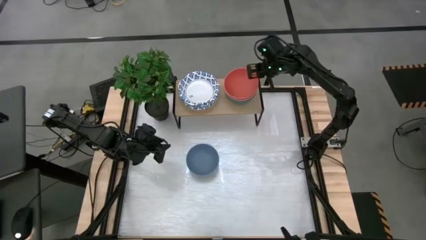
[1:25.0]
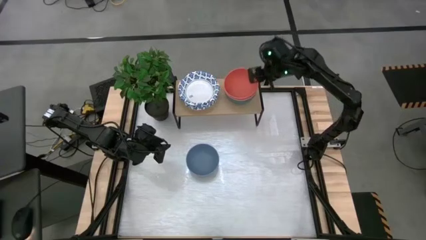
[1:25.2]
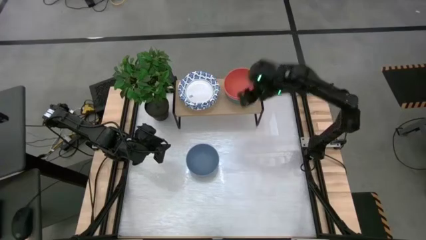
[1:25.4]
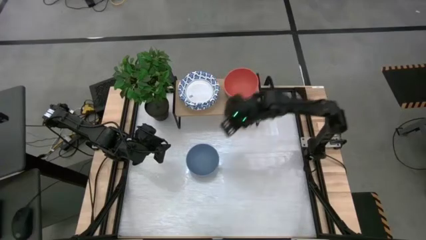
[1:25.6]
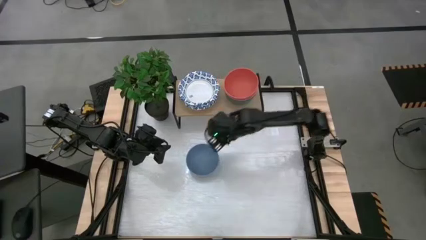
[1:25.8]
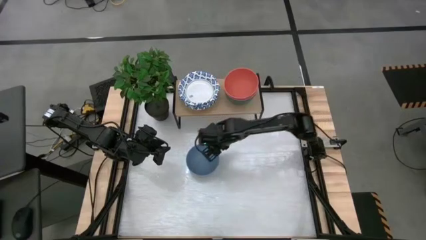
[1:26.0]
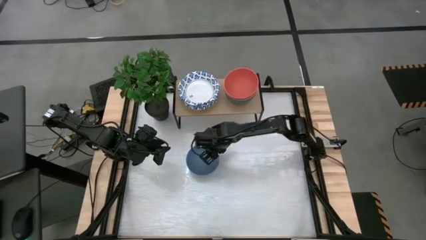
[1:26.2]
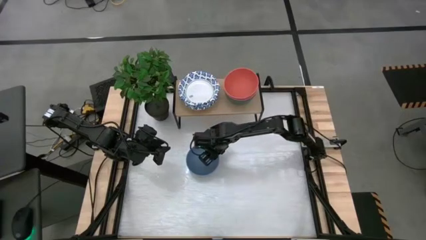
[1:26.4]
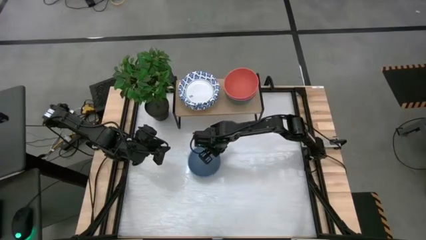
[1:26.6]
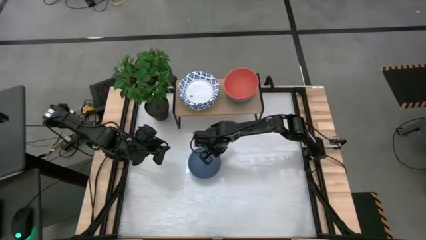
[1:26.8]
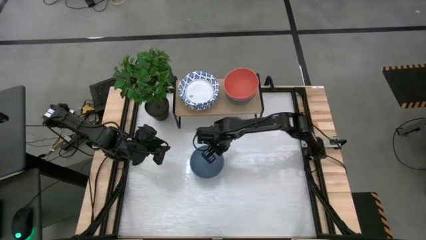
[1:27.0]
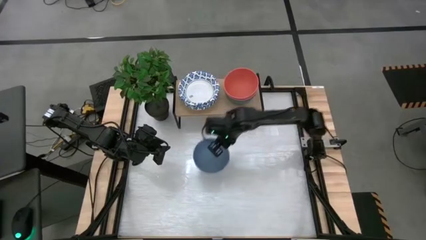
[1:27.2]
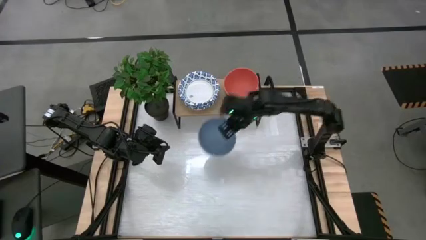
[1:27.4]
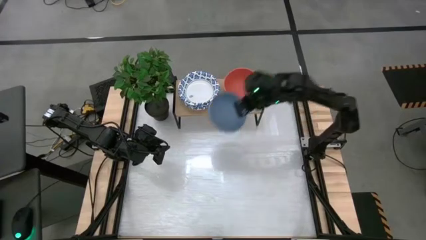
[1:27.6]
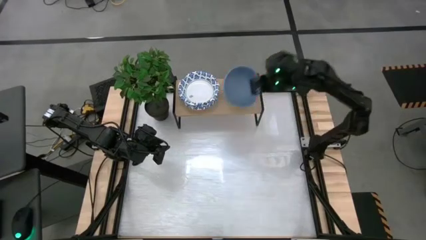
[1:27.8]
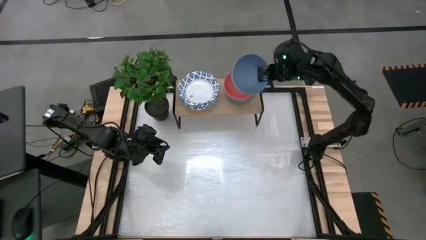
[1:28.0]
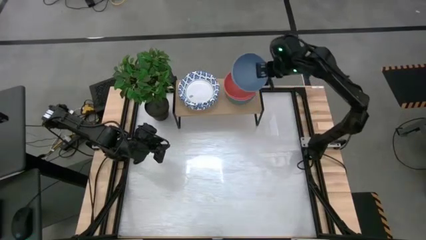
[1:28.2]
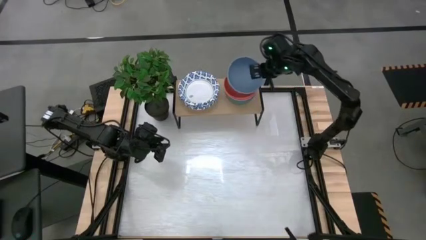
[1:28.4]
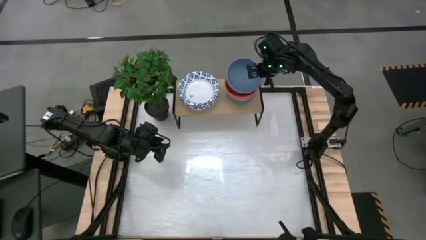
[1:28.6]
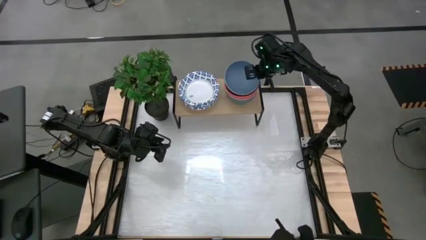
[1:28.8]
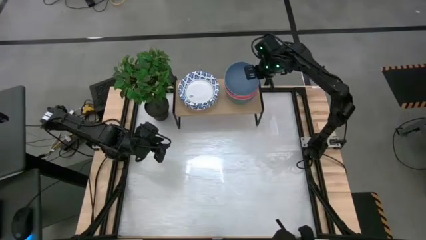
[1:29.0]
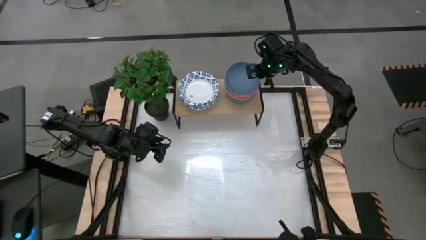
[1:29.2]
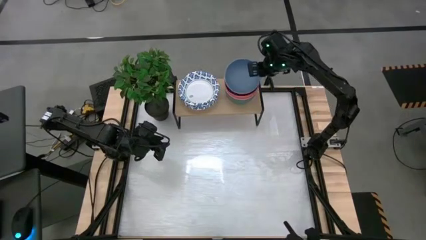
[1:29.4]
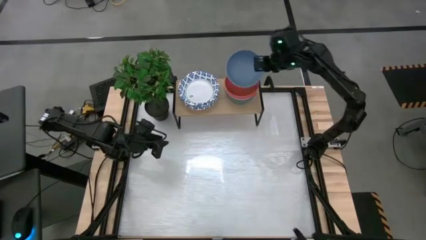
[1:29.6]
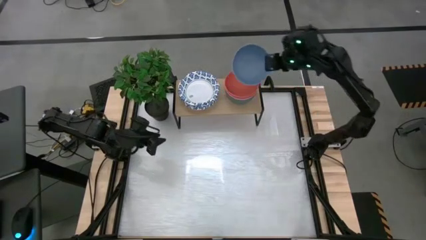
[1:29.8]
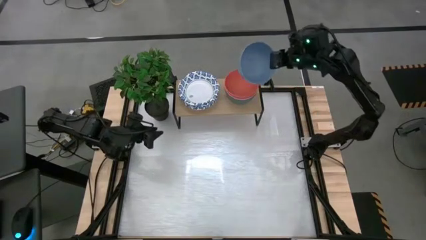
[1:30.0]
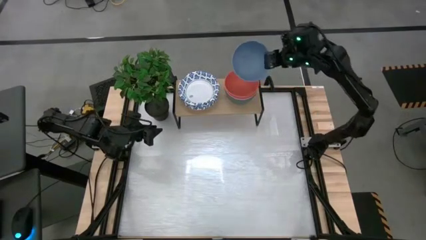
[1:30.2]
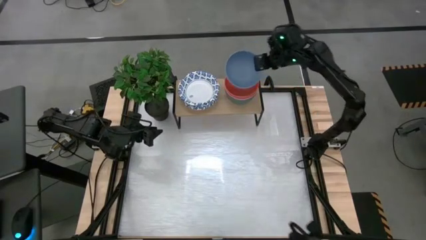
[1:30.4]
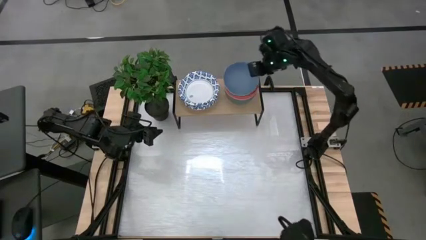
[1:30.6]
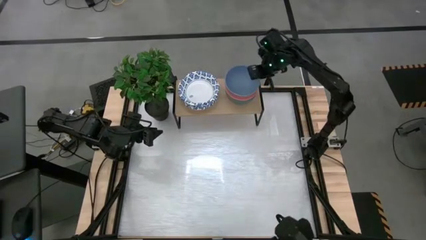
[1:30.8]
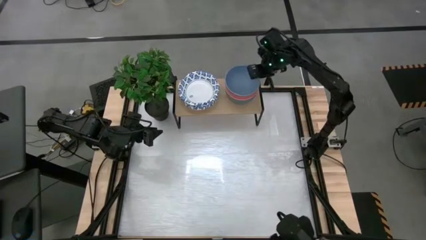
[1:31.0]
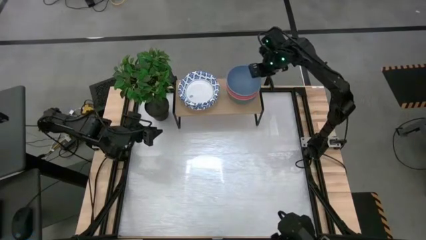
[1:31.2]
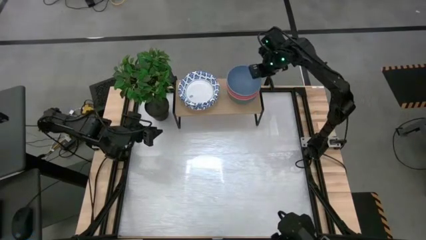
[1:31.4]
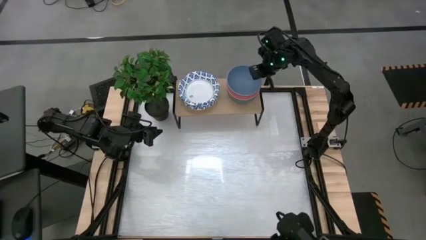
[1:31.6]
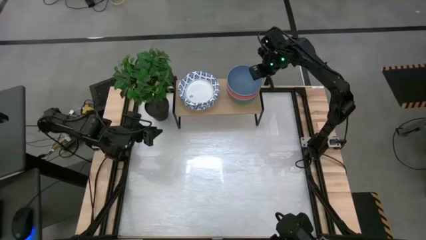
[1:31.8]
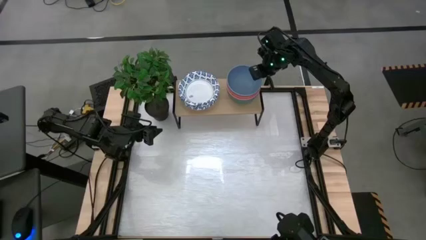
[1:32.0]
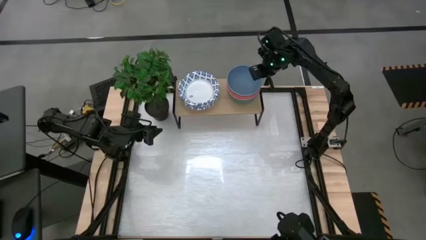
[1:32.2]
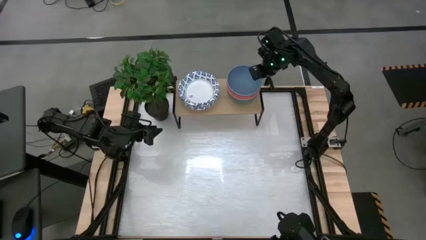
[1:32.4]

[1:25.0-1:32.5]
Task: Place and stack bowls onto a shelf
Stack the blue bowl on top of the orange bowl on the shelf

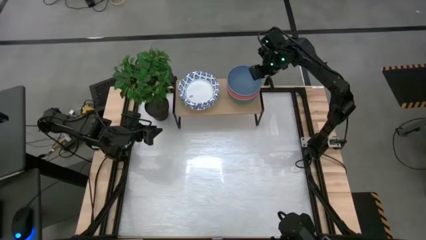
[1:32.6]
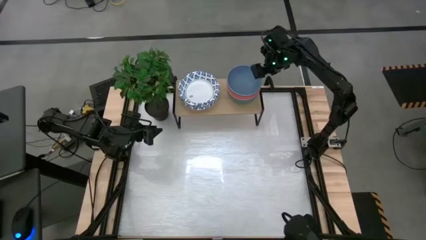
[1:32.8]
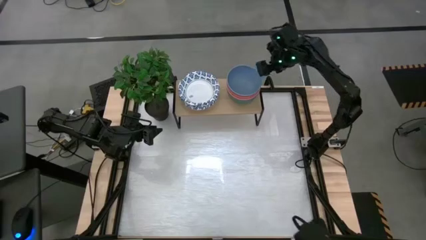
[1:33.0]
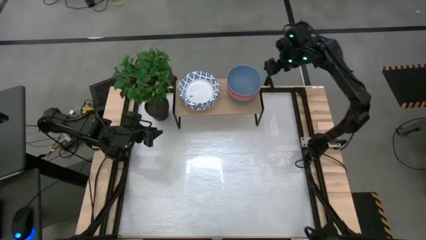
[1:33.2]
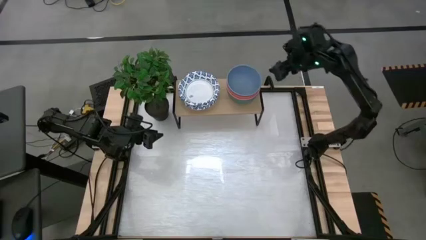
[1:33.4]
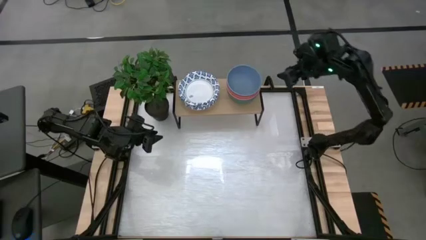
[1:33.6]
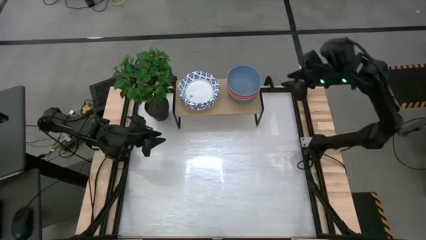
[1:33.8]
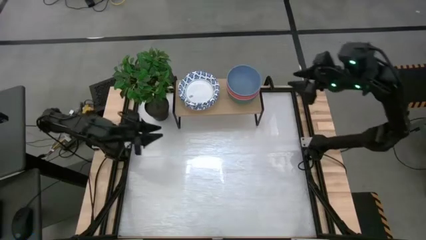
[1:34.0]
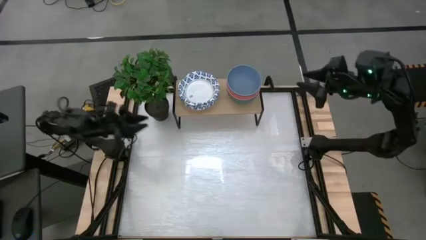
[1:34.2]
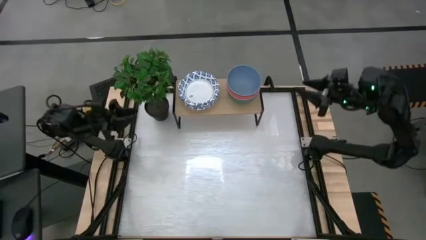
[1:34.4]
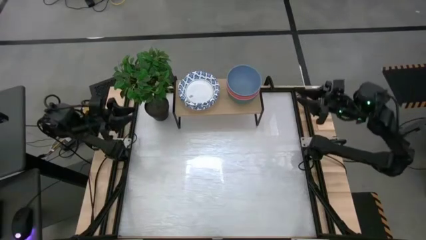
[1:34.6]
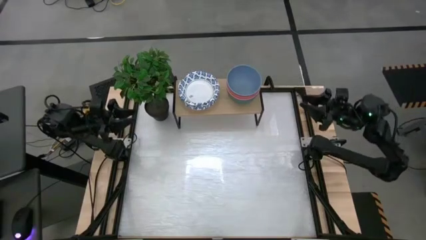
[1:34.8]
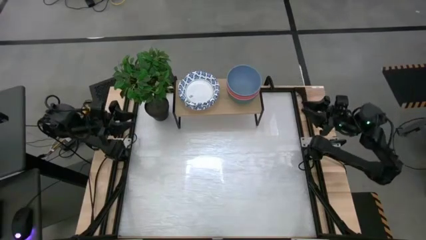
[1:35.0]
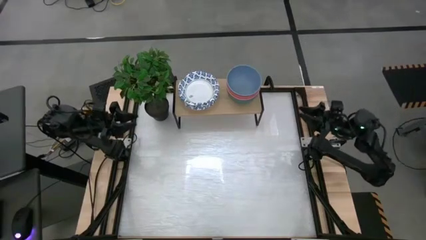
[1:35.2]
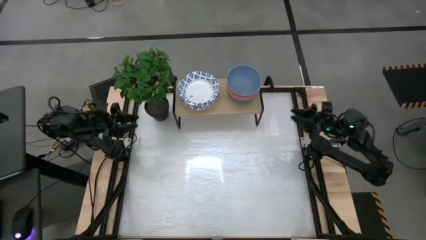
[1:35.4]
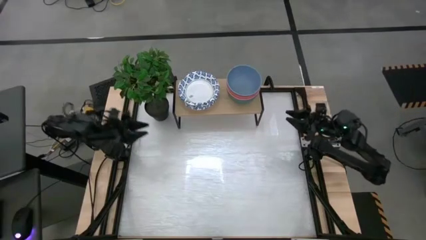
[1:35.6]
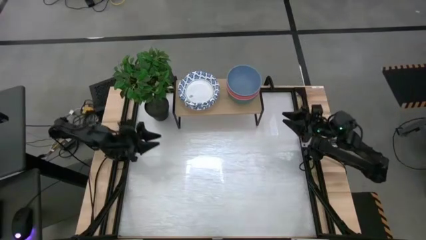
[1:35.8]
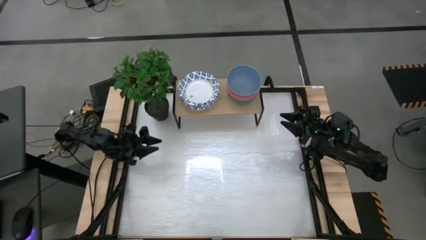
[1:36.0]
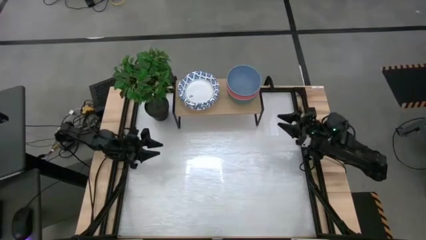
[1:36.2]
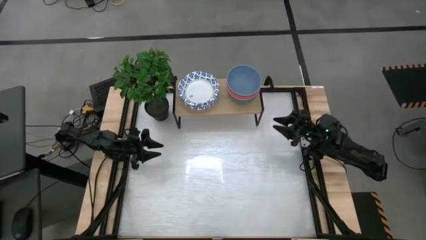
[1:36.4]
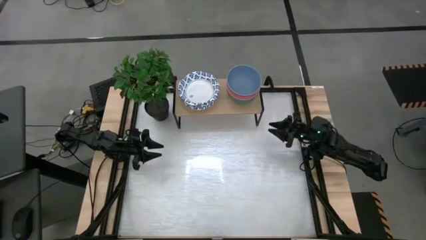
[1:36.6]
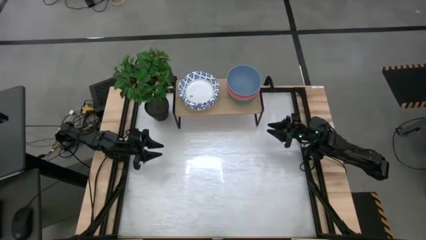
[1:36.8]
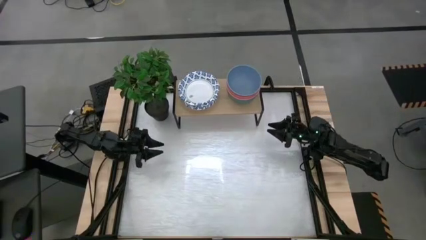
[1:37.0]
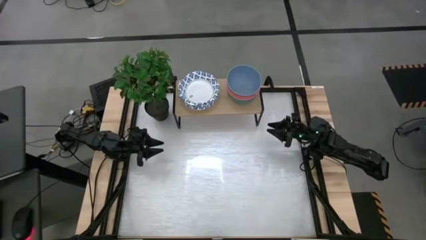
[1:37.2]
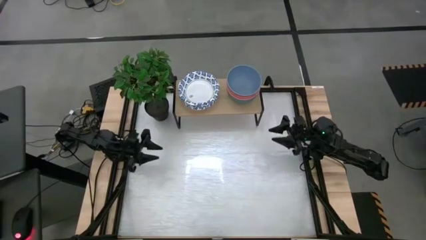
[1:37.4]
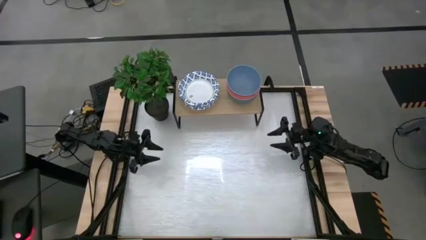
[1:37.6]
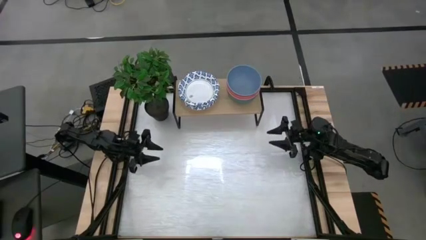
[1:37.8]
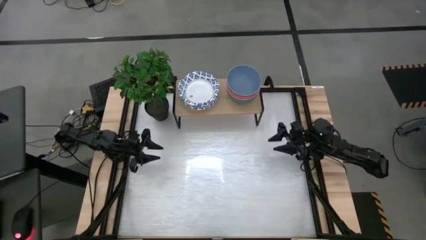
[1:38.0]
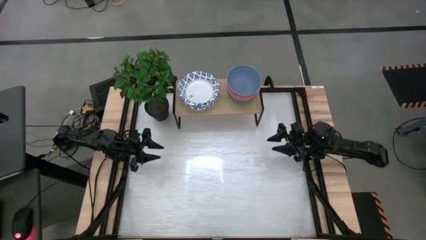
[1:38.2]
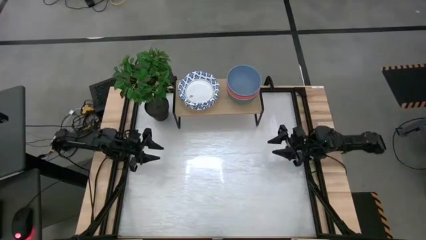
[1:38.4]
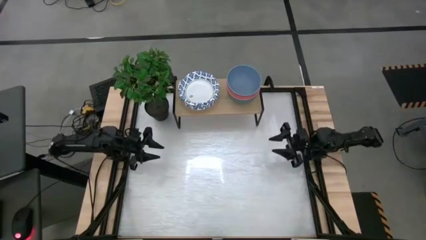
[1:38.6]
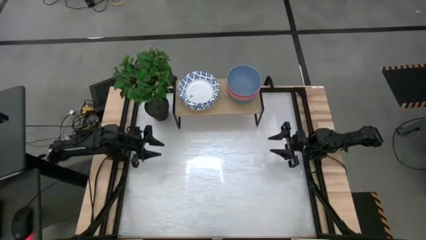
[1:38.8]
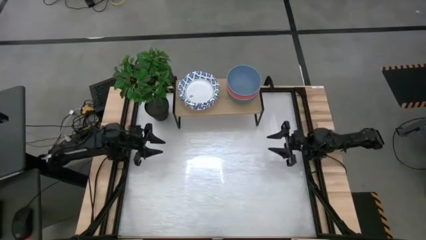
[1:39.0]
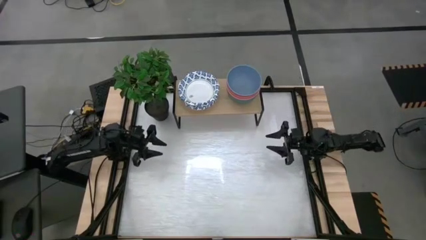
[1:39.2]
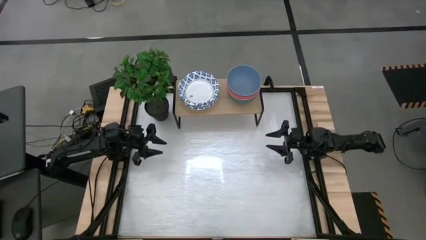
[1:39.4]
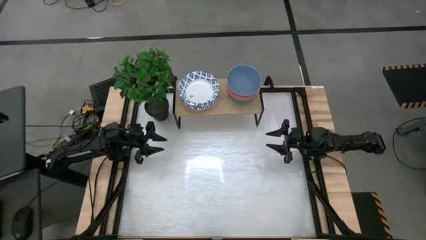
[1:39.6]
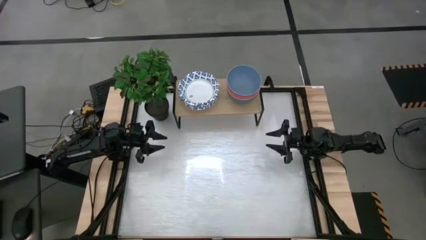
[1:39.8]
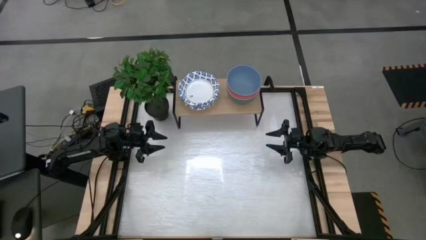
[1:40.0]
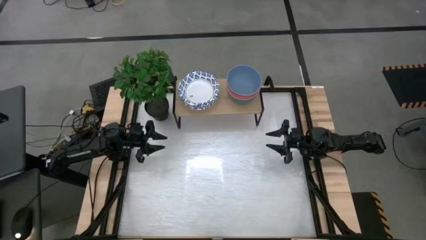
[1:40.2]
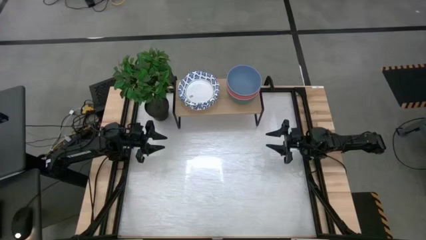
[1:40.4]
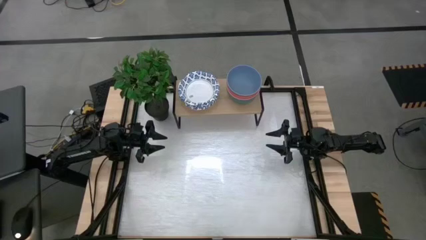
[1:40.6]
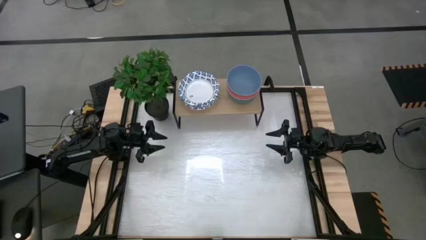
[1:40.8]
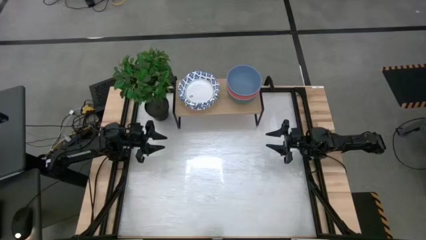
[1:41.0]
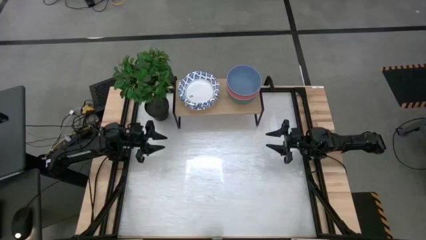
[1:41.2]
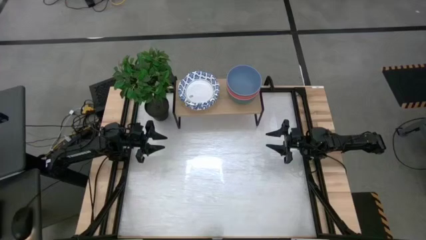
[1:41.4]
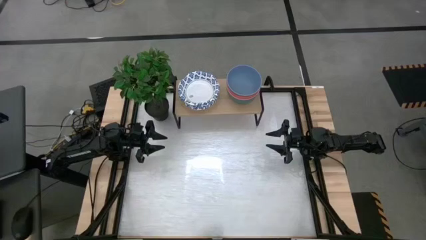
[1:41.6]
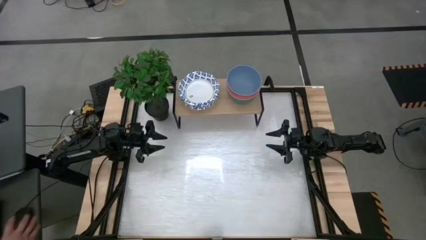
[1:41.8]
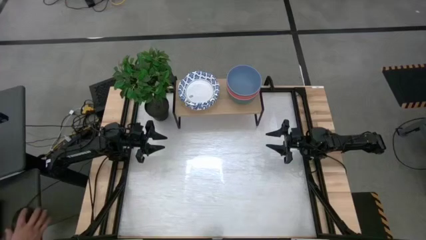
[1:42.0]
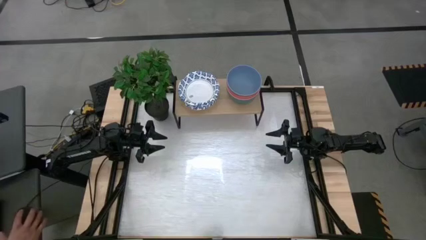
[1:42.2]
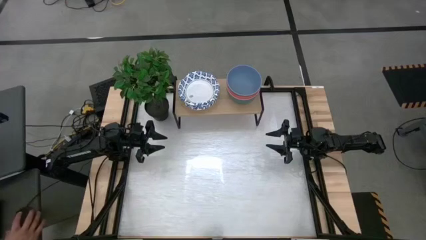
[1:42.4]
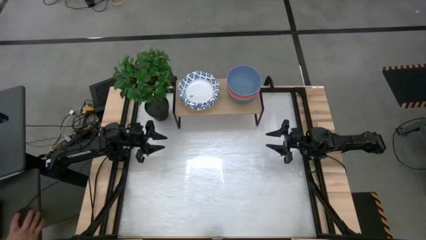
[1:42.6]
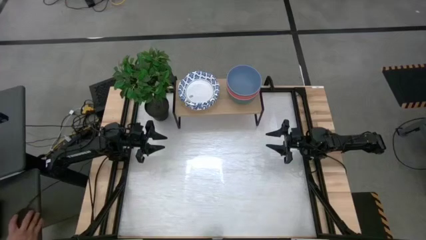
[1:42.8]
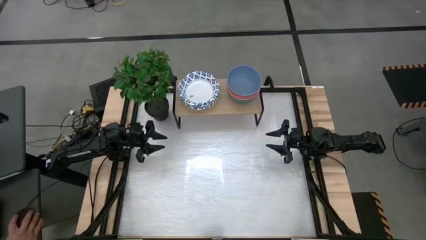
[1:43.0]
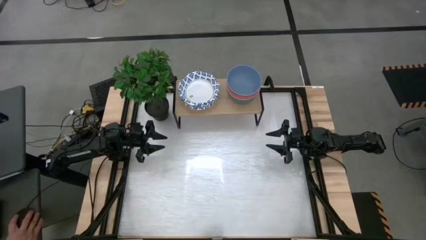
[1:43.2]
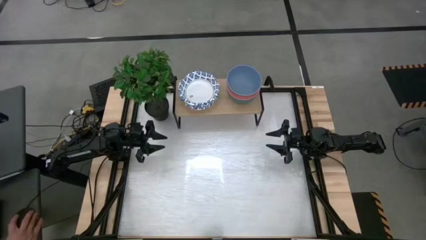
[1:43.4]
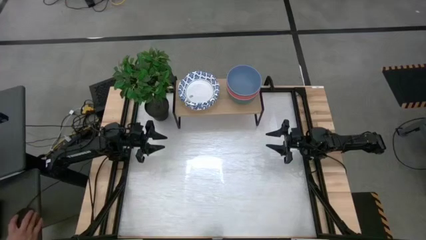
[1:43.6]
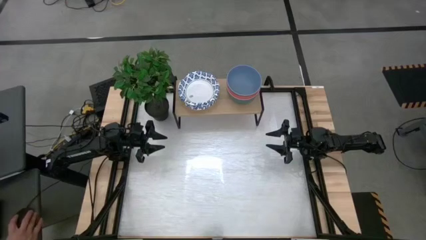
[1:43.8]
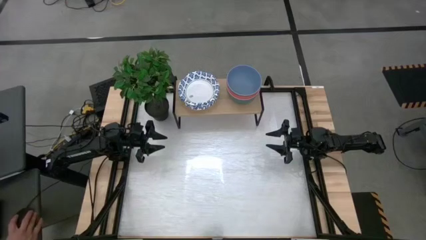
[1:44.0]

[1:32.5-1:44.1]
Return to Home Position
